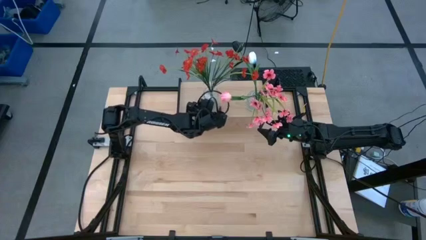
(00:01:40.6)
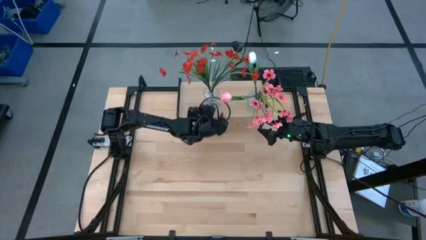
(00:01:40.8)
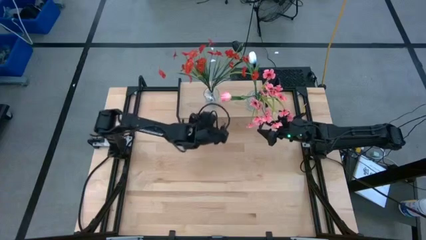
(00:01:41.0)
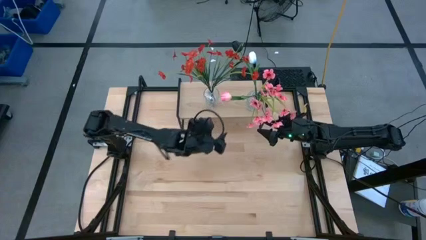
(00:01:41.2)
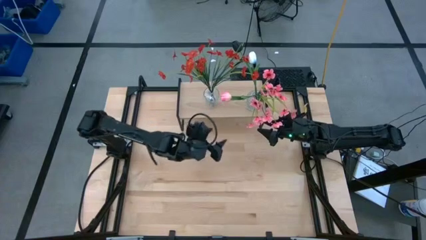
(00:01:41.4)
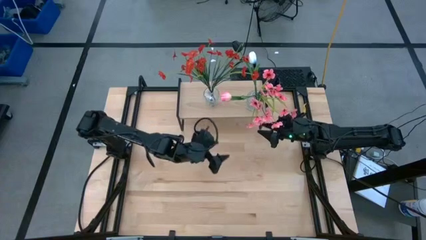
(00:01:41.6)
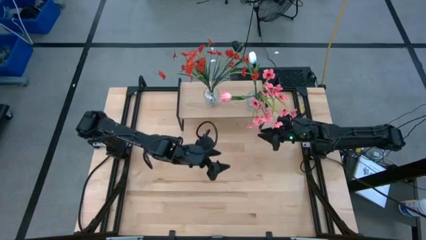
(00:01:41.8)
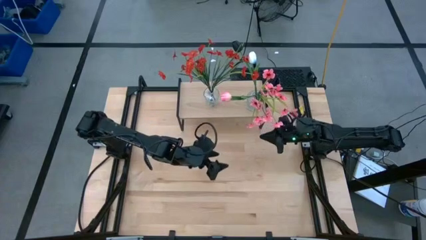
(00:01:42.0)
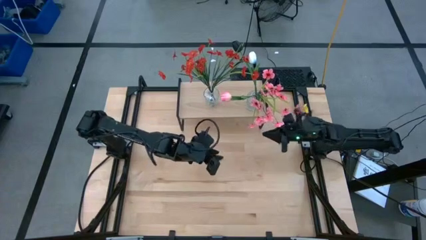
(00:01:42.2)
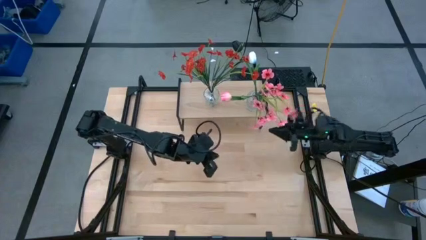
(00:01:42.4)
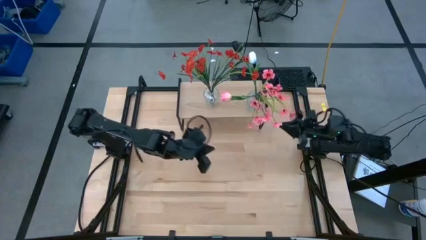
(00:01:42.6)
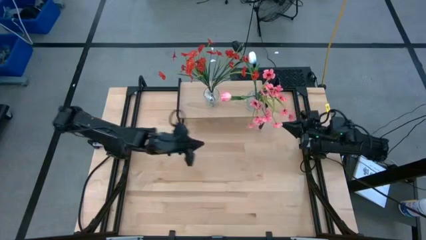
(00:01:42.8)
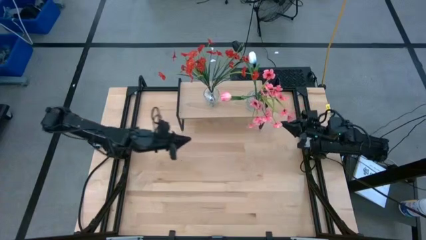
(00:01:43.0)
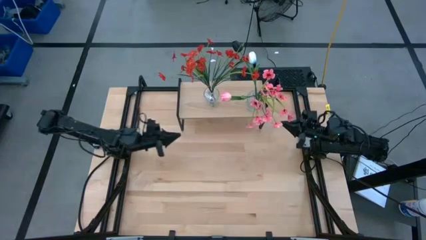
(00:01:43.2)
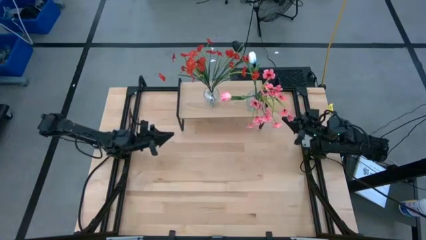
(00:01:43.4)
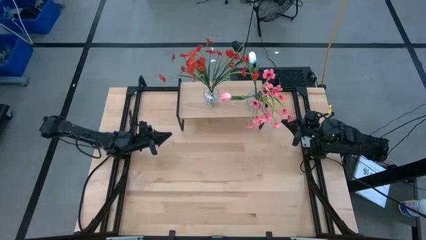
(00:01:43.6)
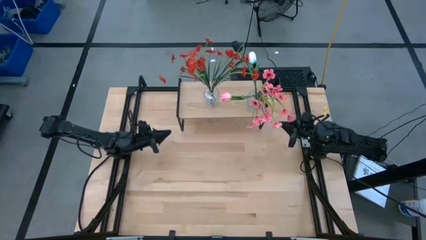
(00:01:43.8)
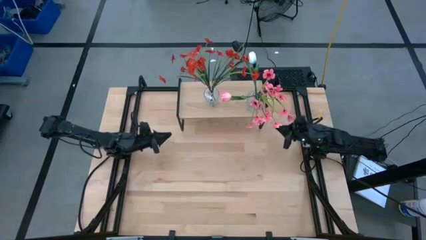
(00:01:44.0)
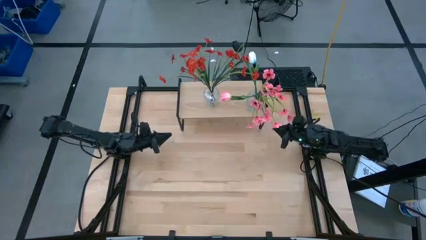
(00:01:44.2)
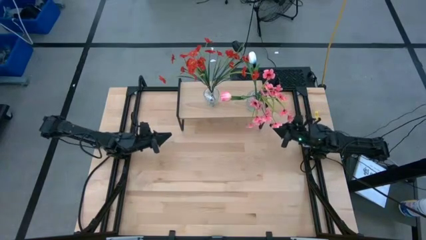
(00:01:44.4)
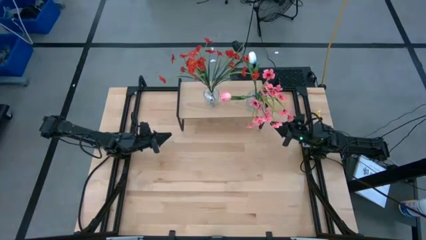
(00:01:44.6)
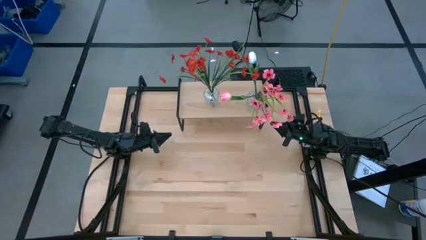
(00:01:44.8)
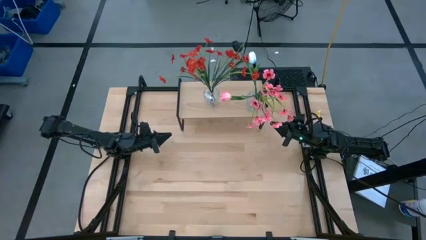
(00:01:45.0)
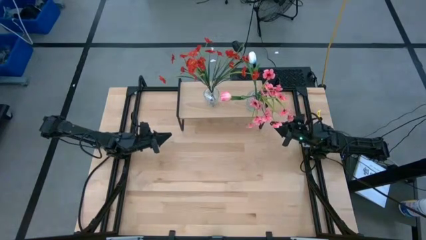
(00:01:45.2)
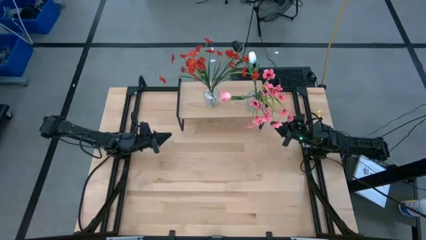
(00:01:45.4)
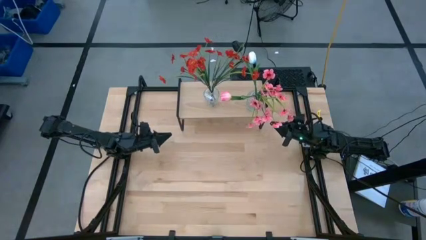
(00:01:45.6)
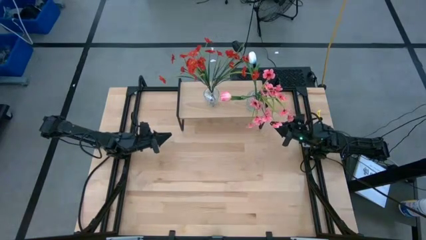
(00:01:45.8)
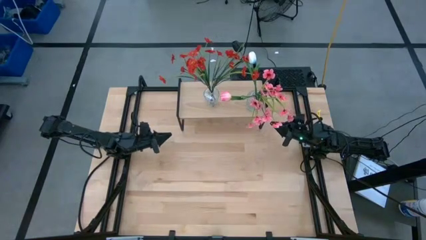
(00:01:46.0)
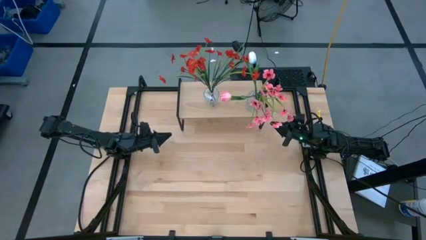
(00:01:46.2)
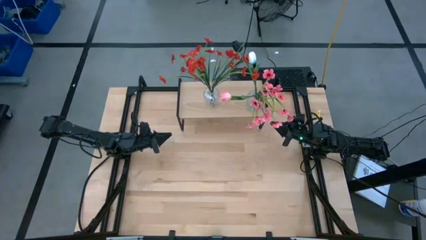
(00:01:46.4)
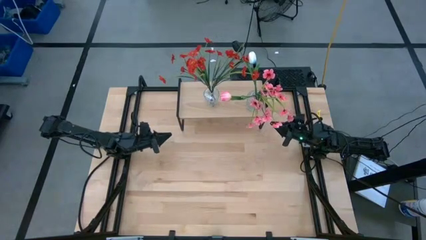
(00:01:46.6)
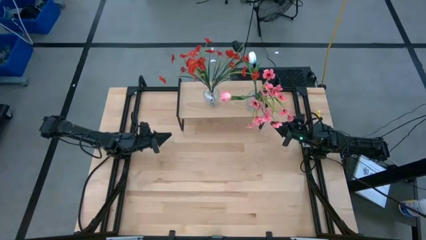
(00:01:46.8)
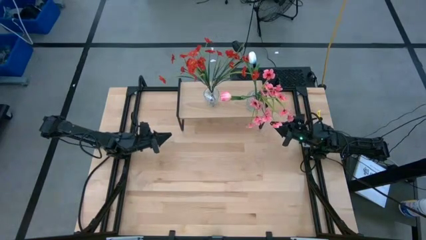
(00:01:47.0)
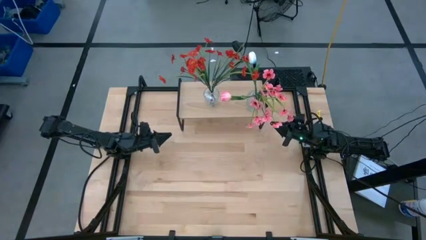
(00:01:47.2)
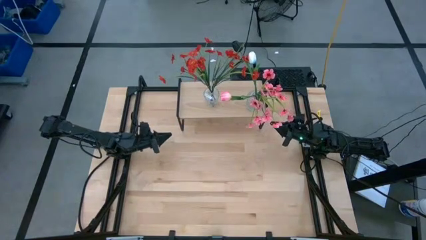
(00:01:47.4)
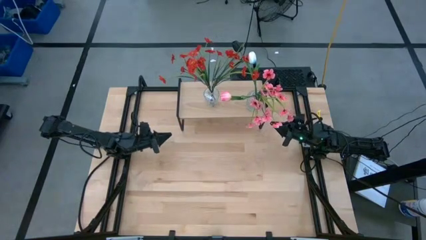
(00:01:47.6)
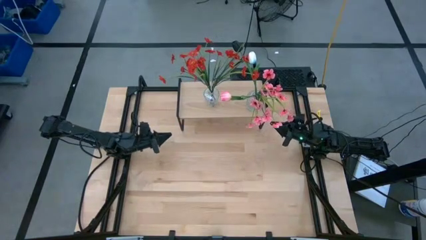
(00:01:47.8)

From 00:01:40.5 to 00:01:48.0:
Task: Pick and place flowers into a vace then onto a shelf
Return to Home Position

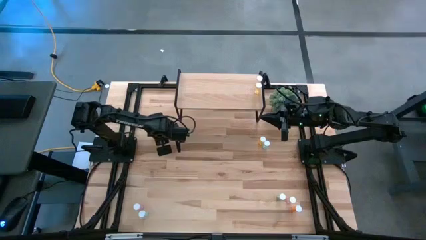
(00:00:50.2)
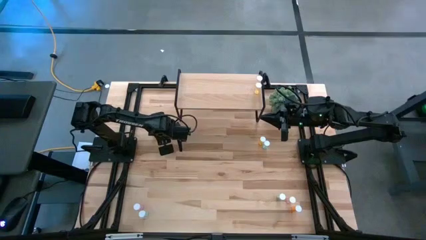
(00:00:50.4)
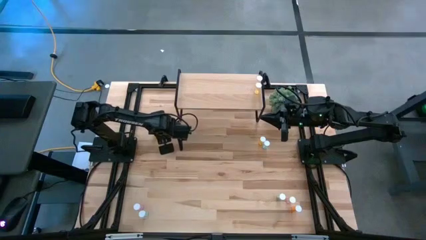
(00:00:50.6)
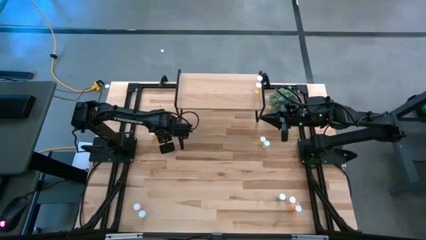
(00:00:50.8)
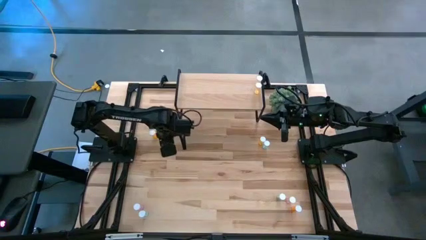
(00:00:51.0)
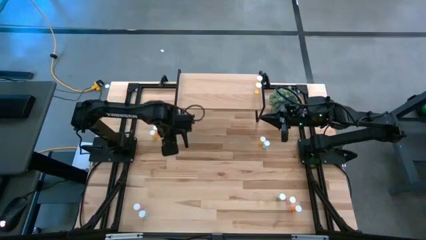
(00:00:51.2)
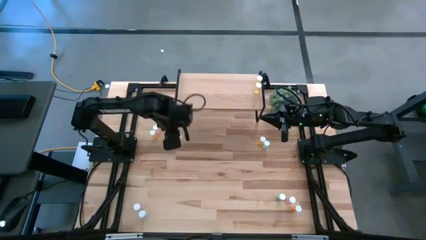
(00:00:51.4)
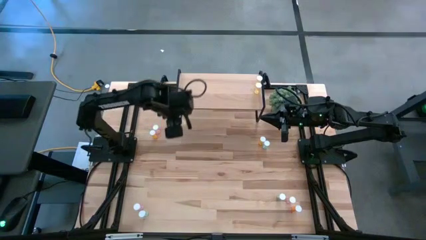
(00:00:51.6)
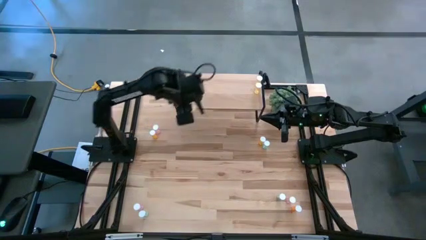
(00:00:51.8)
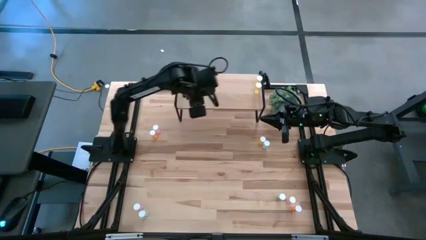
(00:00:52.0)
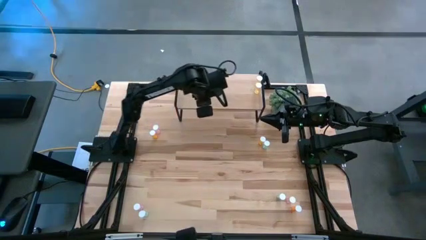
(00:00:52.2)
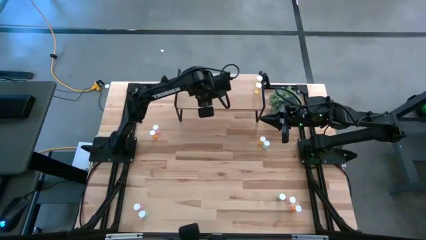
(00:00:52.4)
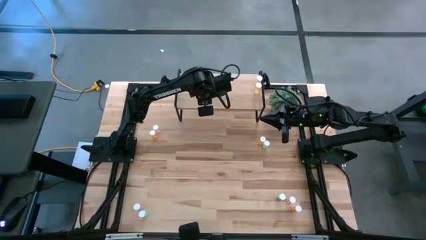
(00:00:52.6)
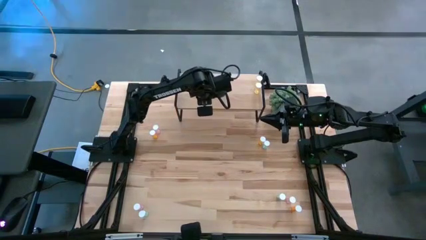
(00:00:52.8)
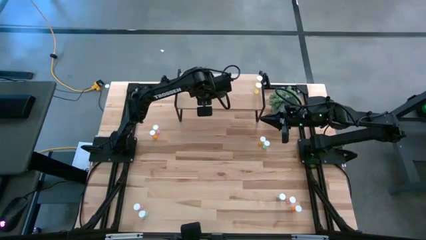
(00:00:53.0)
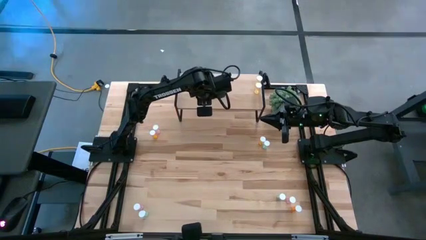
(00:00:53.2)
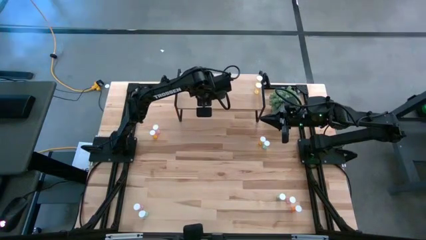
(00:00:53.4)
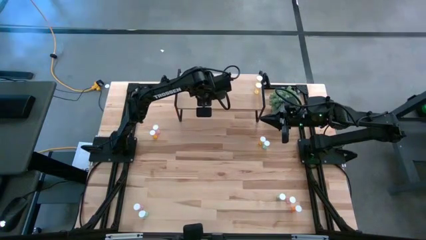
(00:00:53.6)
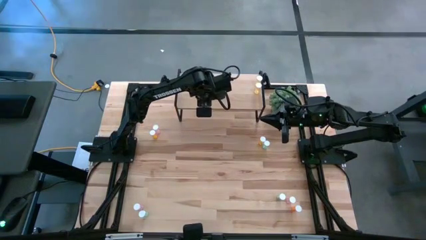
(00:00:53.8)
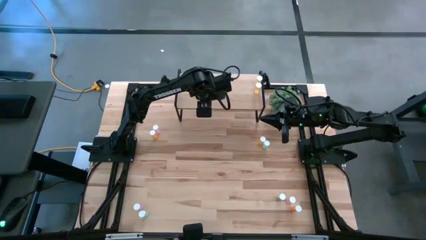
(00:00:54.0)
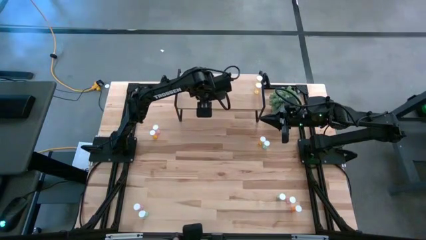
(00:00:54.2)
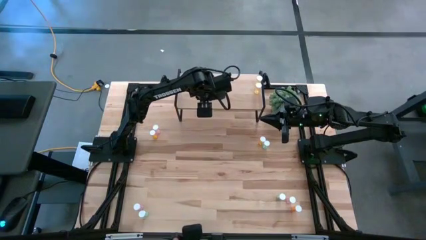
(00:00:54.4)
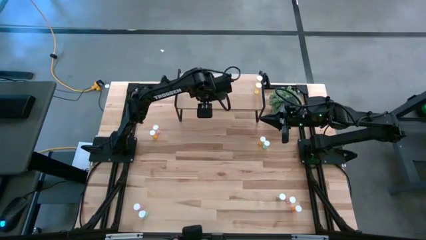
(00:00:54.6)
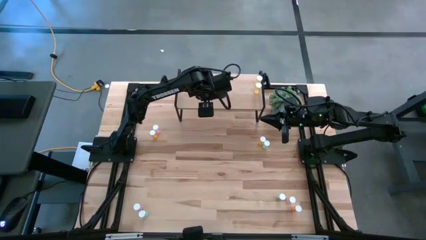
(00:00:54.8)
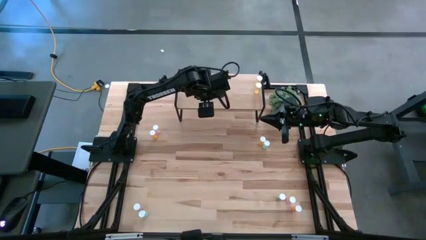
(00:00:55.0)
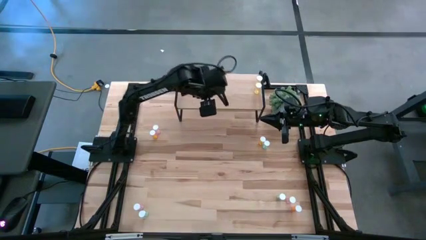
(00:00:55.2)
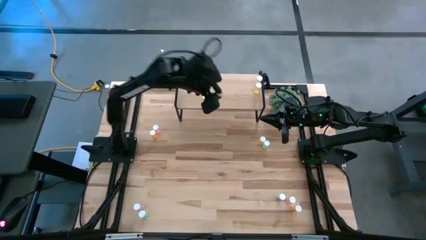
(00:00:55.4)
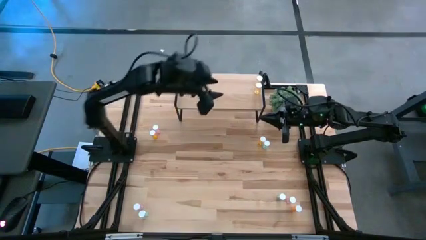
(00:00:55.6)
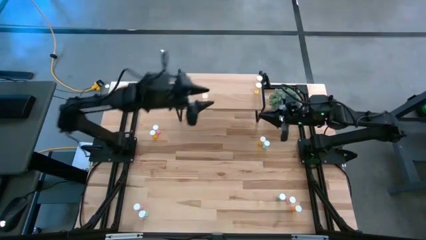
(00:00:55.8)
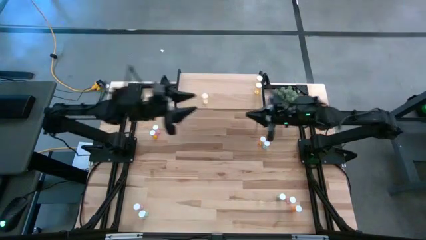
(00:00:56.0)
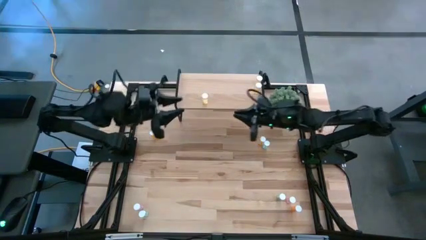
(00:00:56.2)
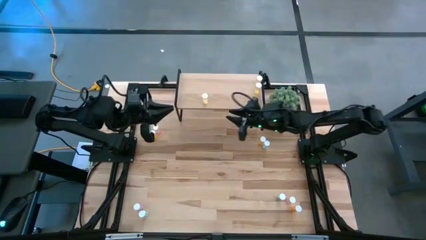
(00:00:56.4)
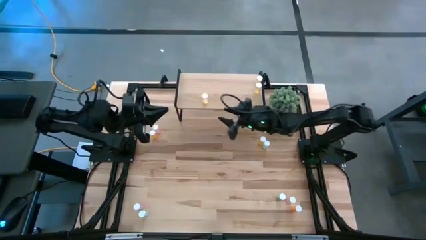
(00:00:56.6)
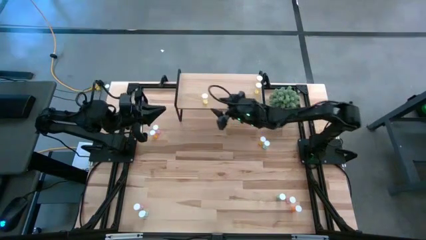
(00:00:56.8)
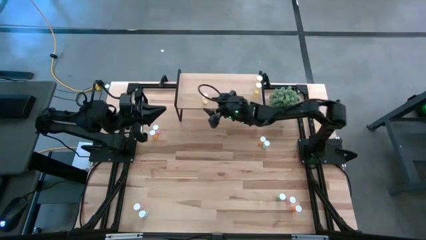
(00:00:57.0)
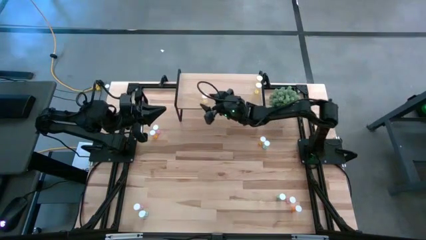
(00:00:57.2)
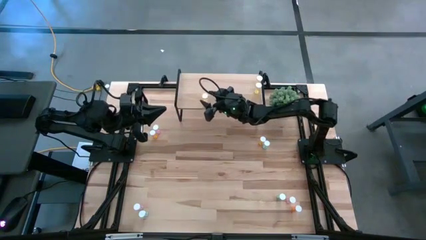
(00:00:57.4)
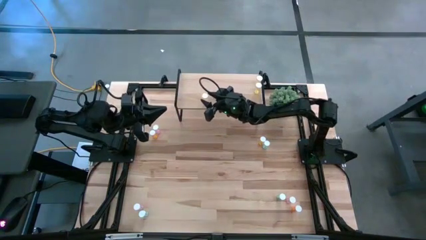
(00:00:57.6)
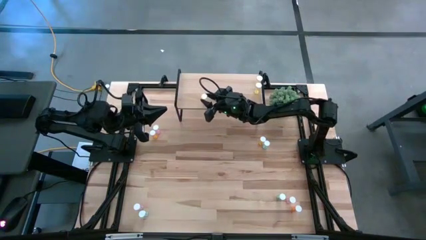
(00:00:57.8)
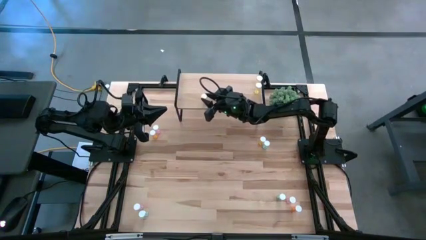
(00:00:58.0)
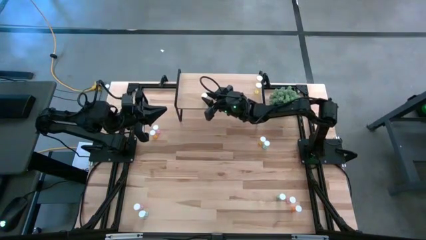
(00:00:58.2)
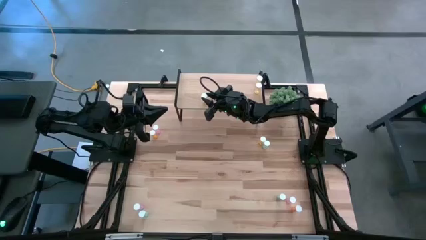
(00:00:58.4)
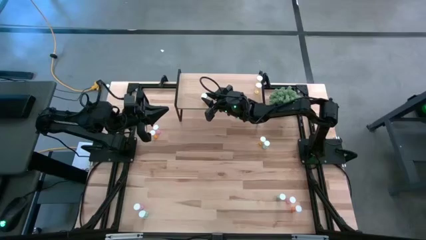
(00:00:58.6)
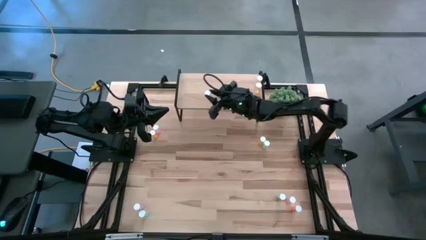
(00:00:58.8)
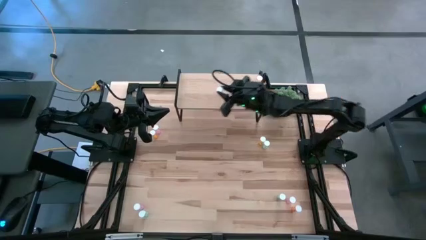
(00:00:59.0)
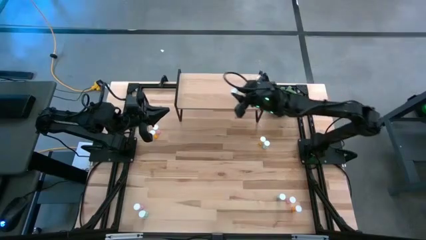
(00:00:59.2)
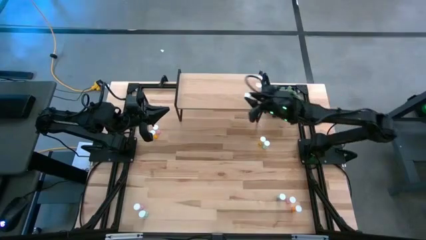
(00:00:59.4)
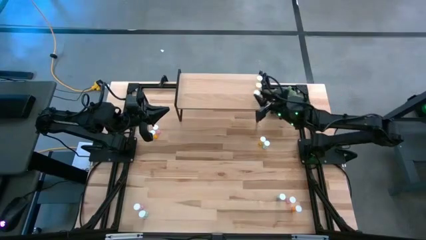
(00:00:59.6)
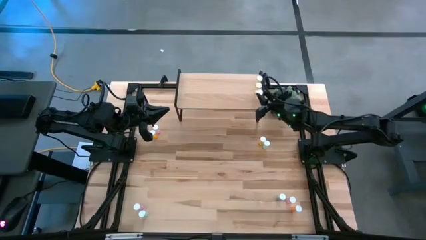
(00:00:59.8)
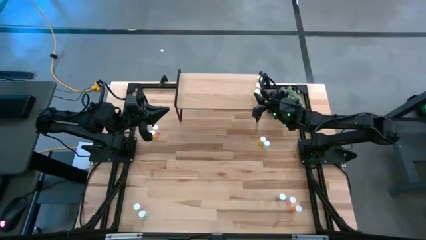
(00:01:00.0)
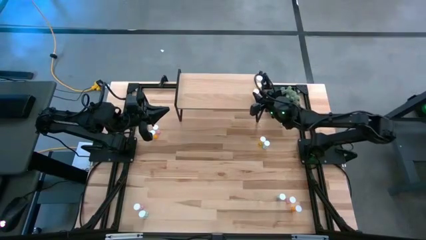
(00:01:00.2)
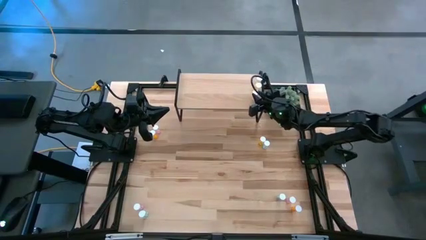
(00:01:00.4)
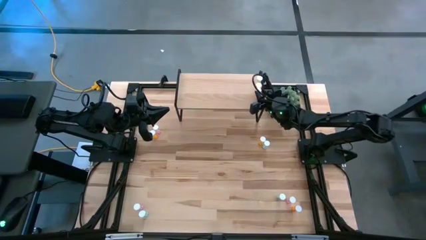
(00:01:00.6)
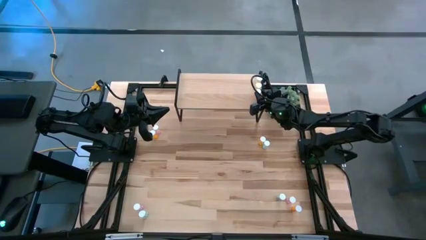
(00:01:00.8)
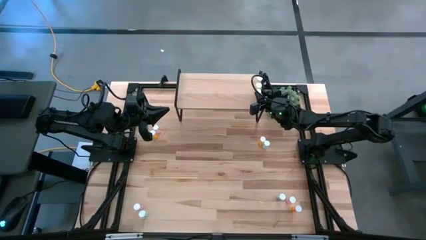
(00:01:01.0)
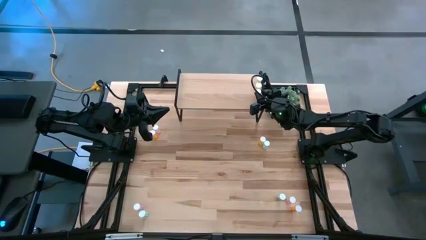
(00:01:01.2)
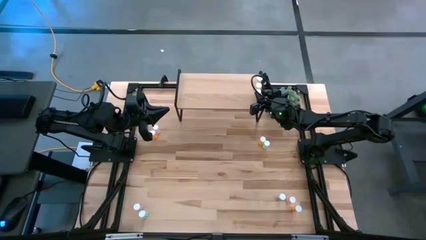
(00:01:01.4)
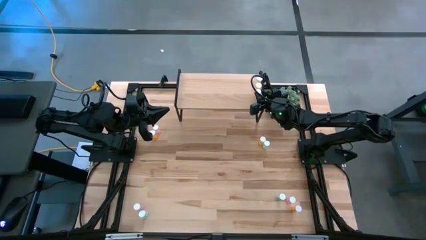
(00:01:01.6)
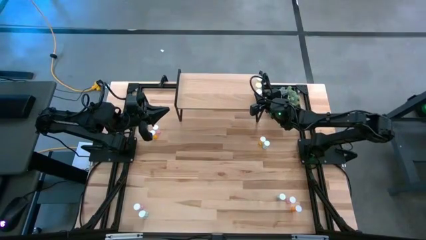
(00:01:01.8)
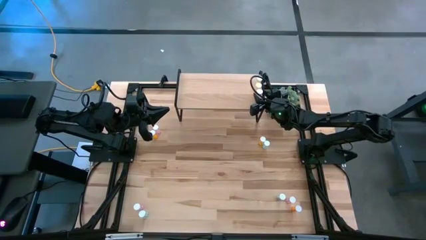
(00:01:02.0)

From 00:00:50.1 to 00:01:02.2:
Task: Pick and place medicine bottles onto shelf by color
Put the yellow pill bottle on the shelf aligned with the other yellow pill bottles
